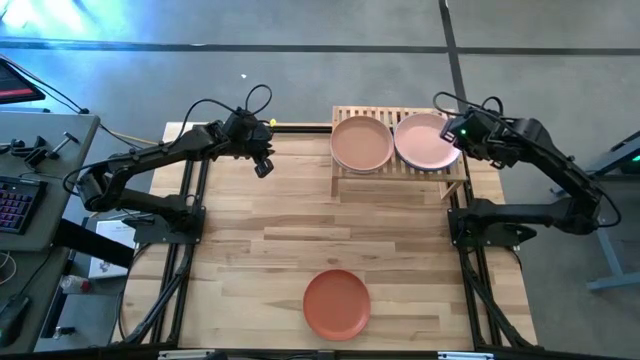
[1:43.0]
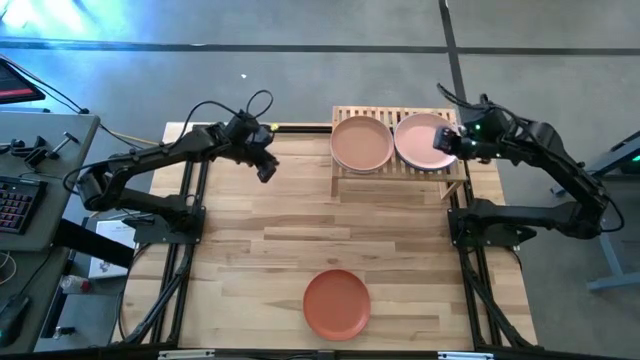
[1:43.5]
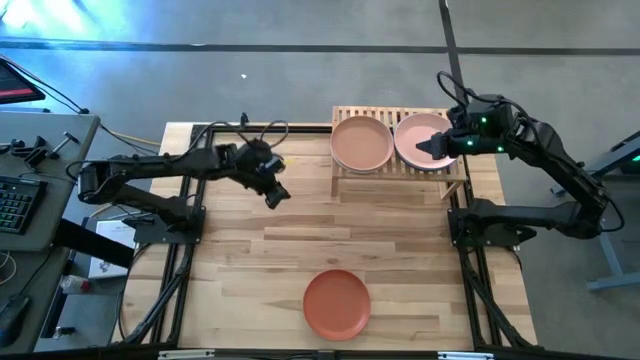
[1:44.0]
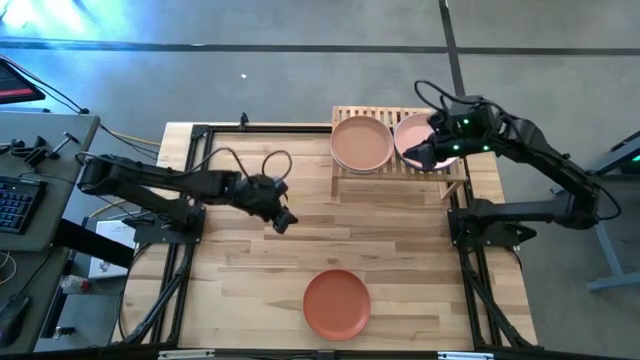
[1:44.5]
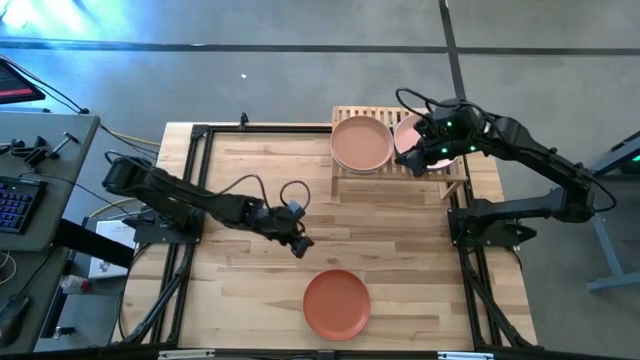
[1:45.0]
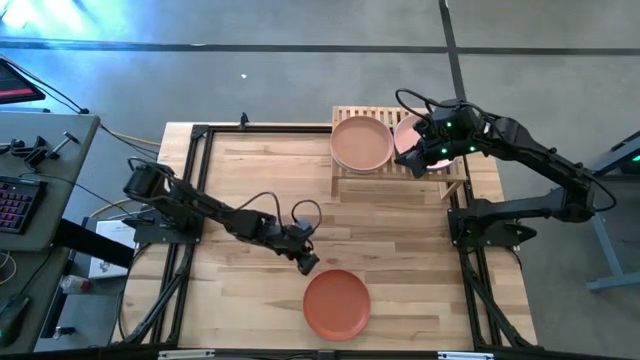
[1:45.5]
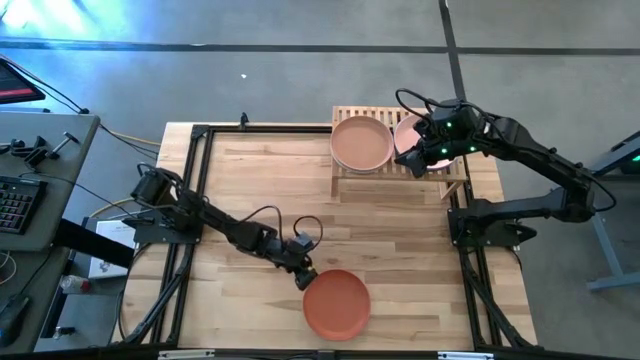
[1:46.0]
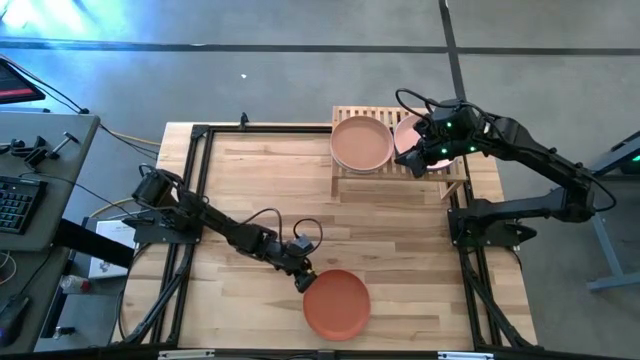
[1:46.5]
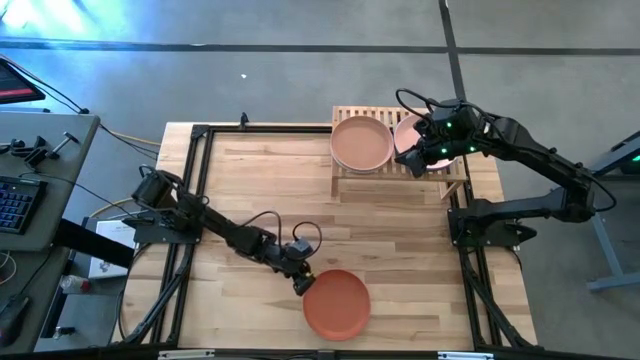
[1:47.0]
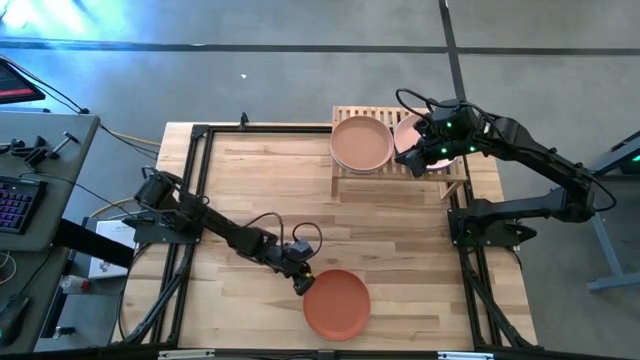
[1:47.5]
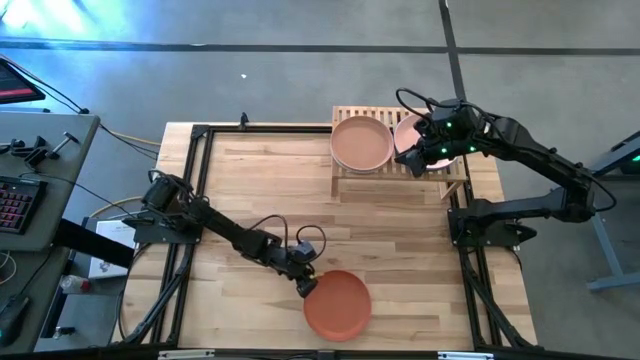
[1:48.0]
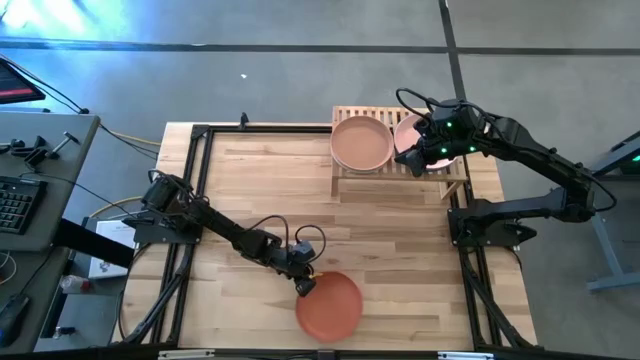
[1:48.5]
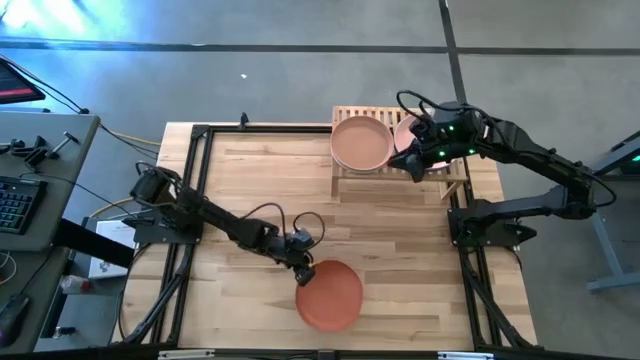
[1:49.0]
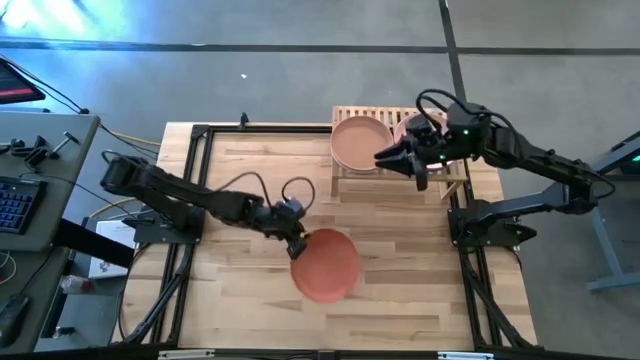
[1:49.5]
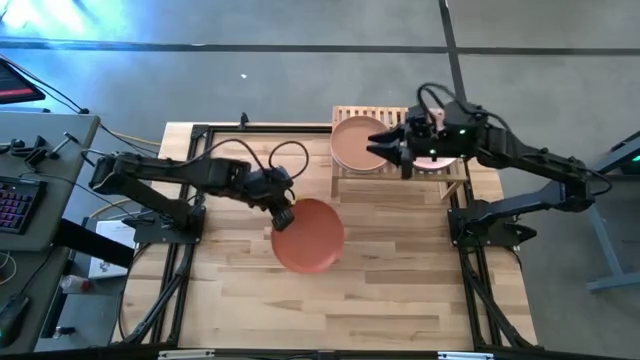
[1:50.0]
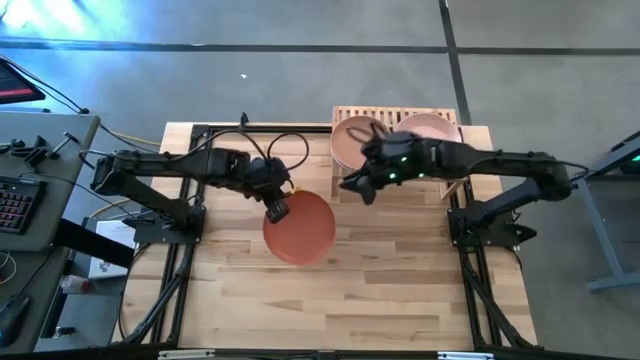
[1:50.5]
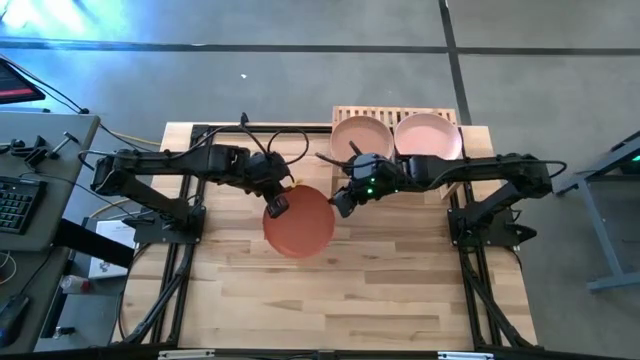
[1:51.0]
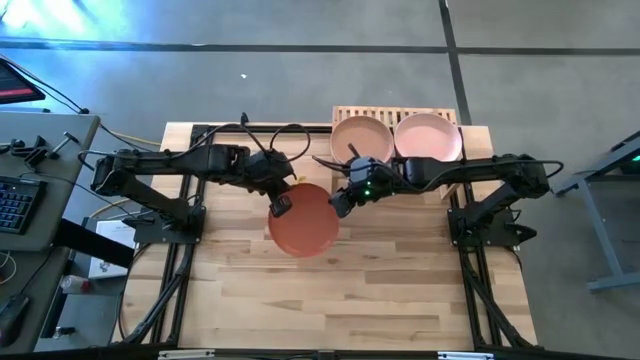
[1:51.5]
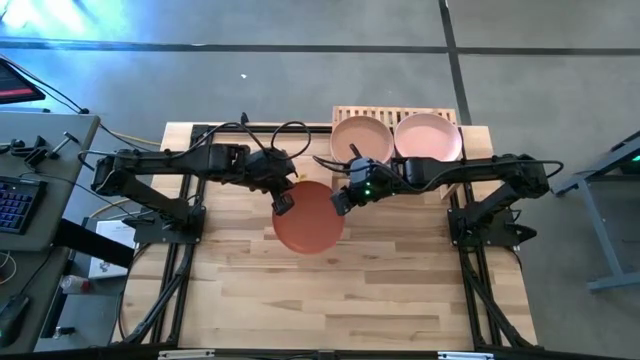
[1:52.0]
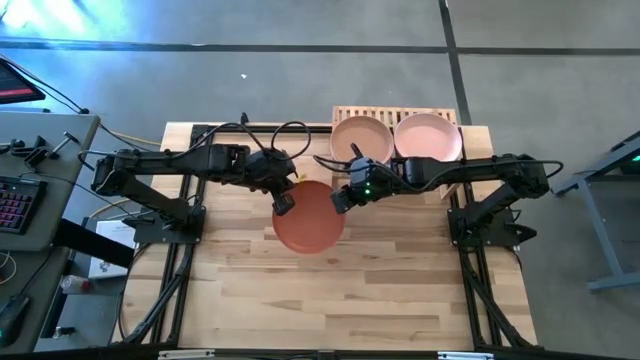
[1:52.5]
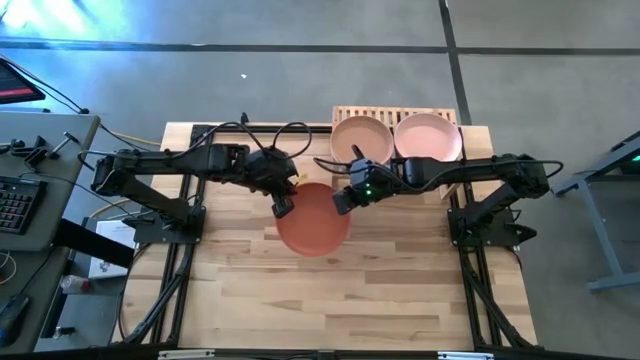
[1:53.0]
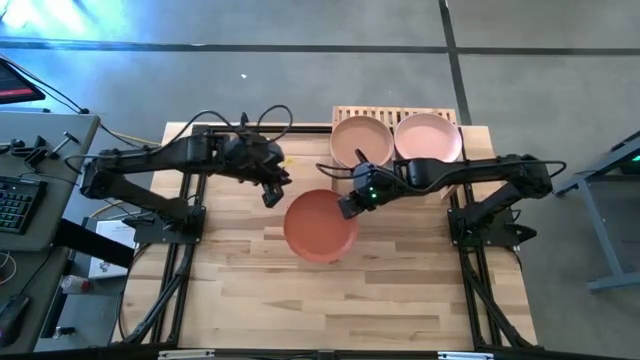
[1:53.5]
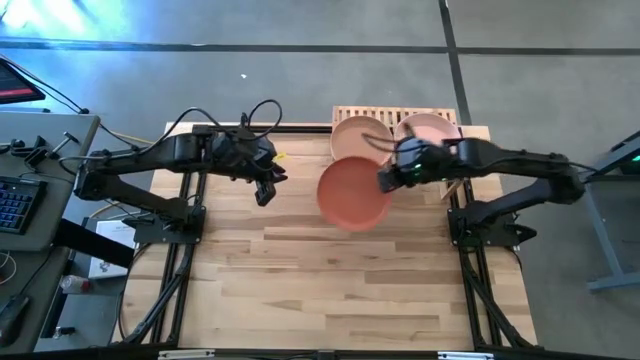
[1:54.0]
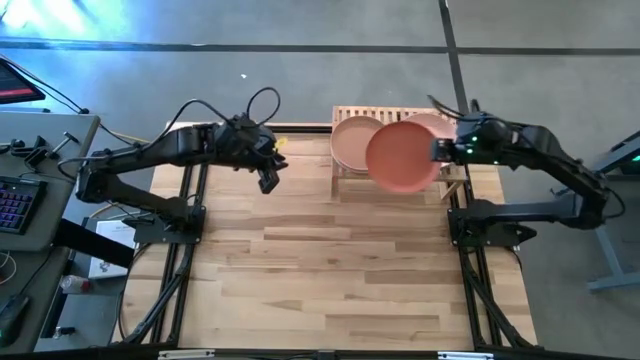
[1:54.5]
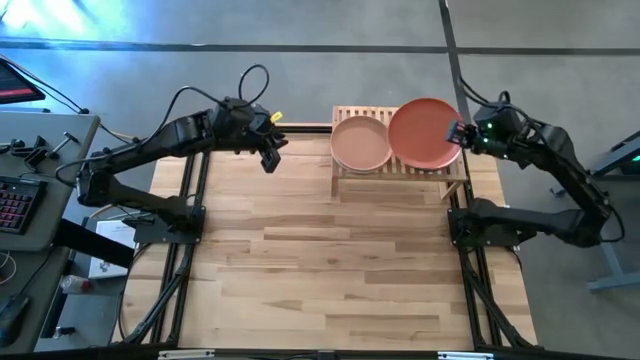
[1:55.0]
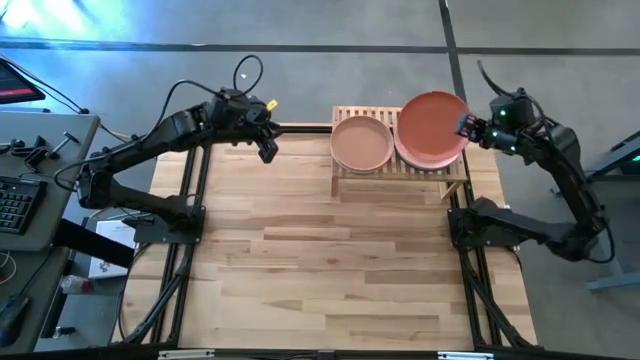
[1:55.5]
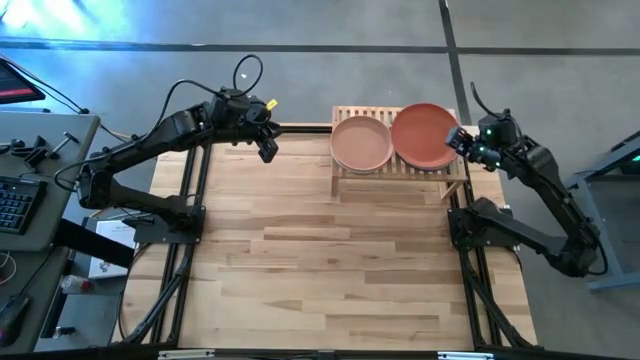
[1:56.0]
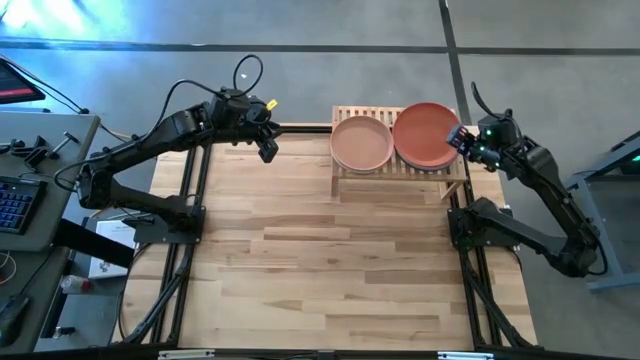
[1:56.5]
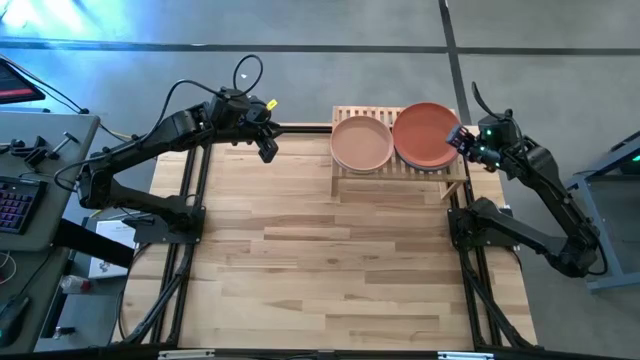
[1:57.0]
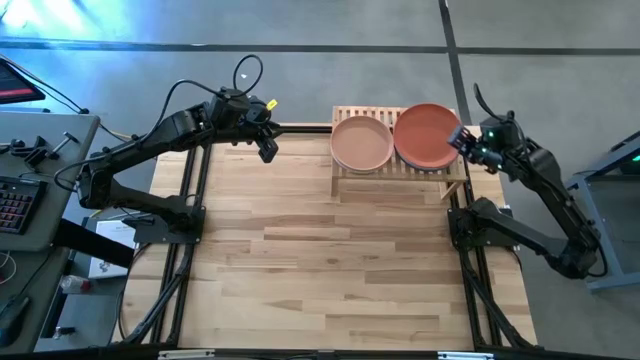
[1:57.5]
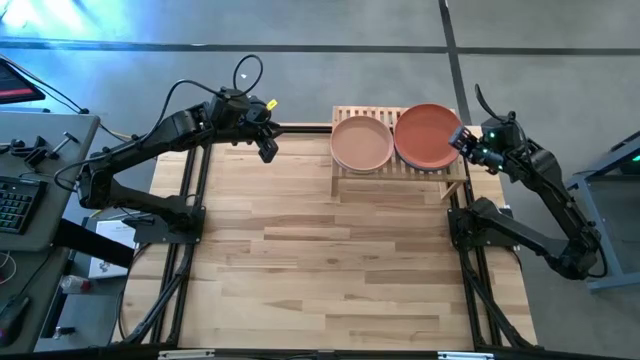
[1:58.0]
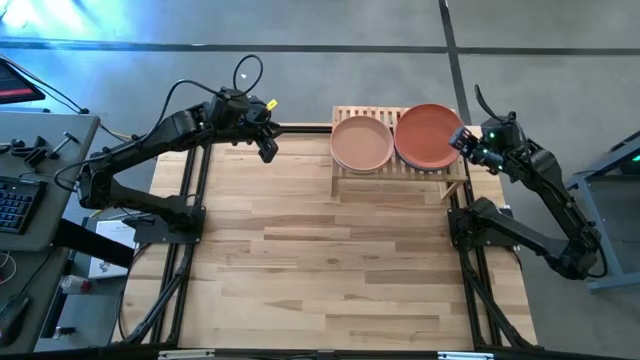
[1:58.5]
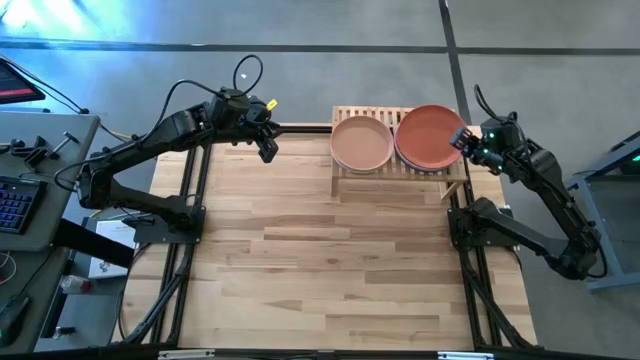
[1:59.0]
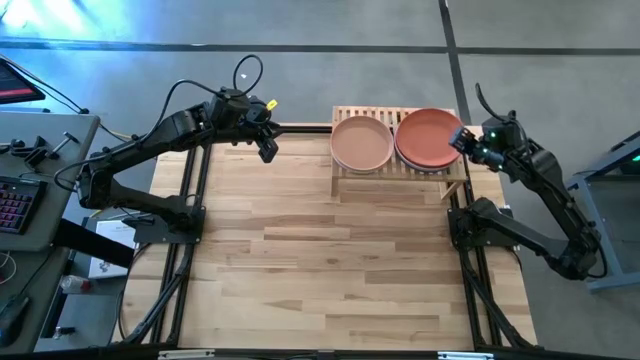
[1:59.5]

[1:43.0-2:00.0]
Task: Place and stack plates onto a shelf
Stack the orange plate on top of the apricot plate

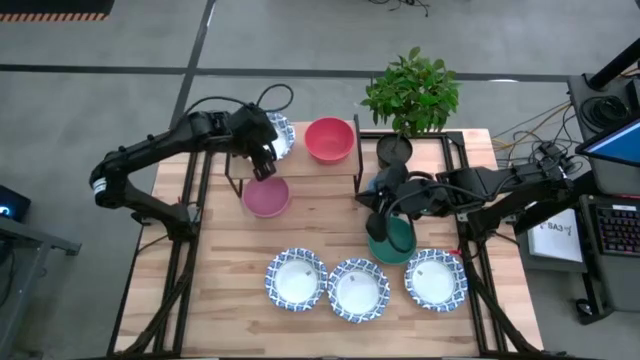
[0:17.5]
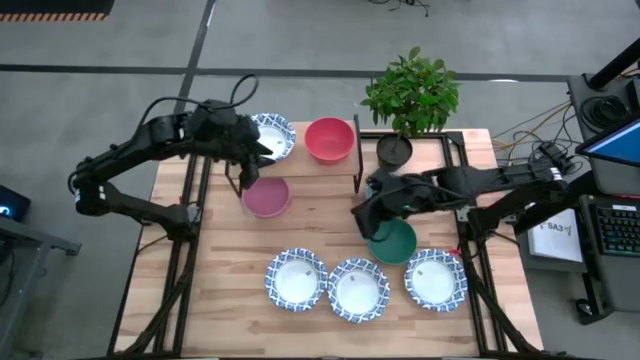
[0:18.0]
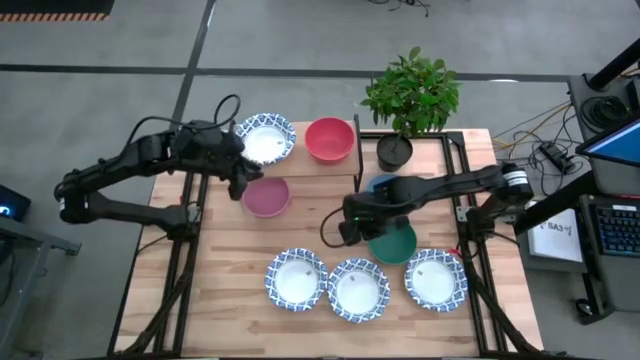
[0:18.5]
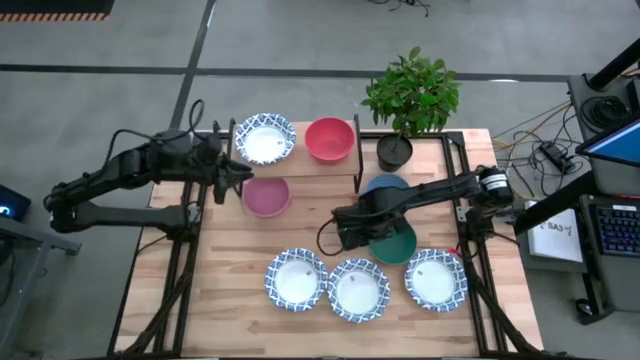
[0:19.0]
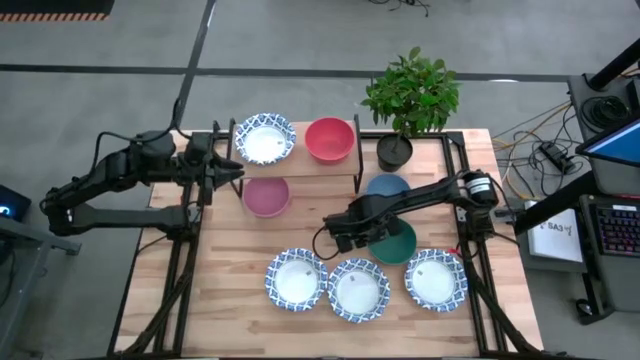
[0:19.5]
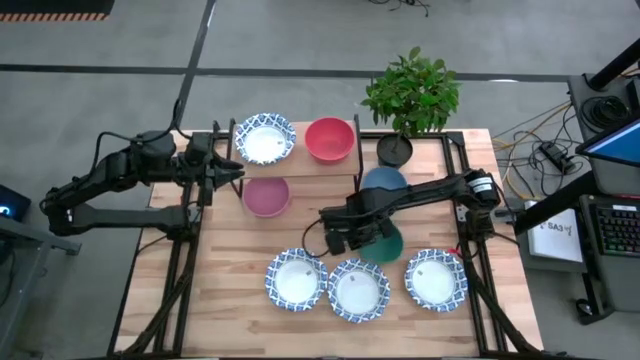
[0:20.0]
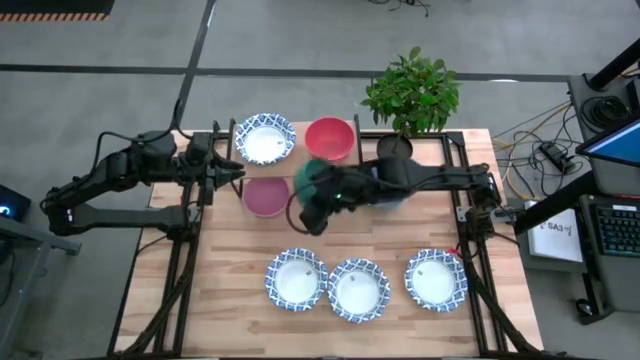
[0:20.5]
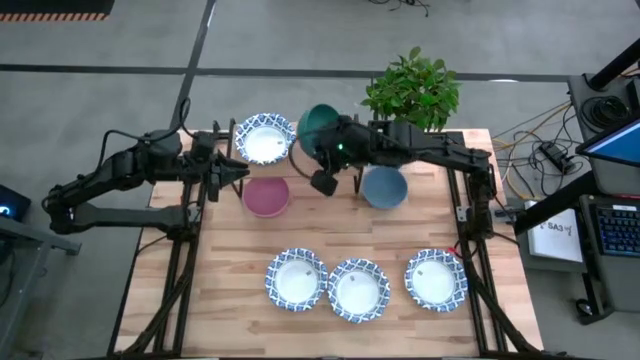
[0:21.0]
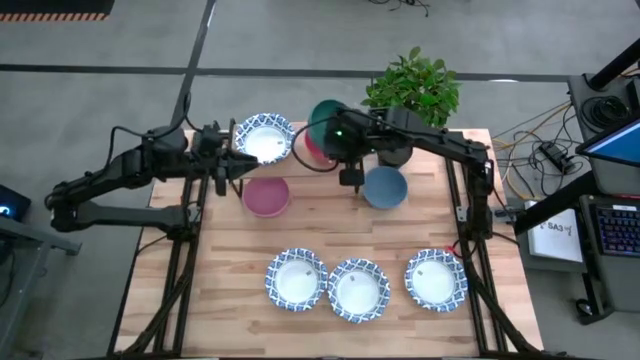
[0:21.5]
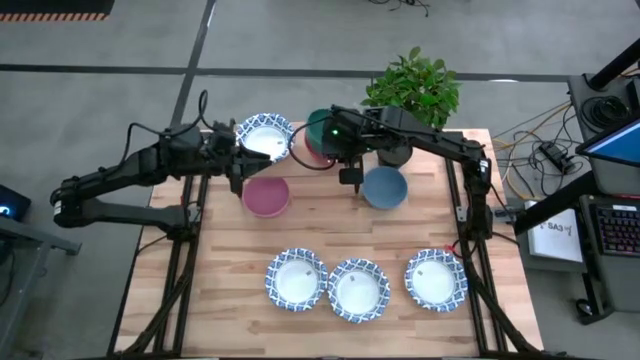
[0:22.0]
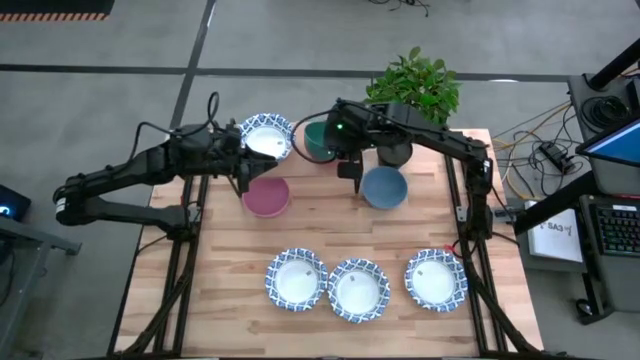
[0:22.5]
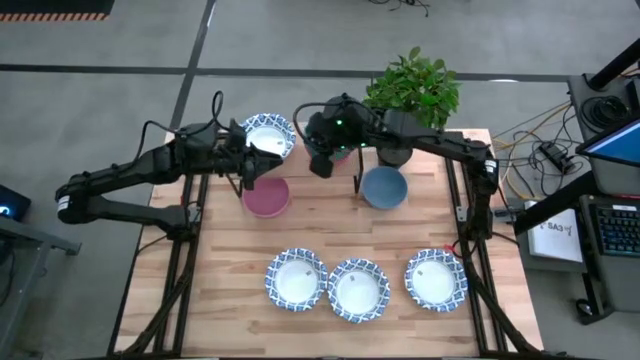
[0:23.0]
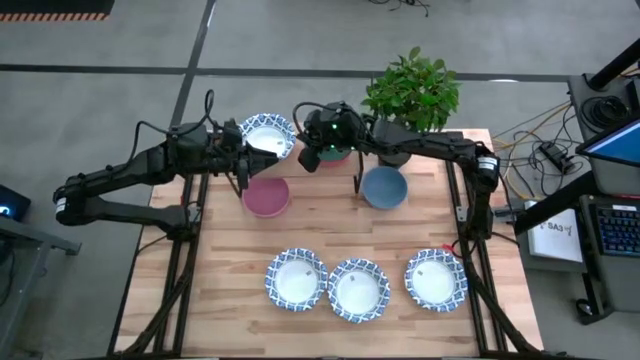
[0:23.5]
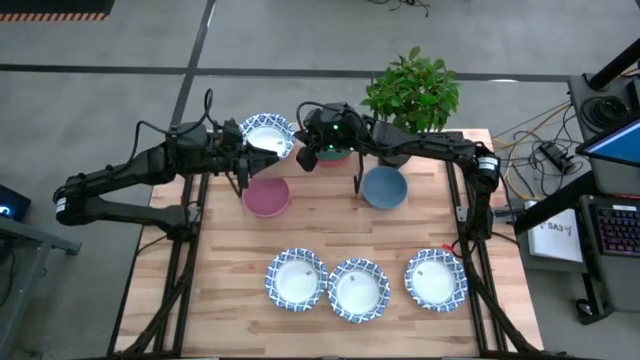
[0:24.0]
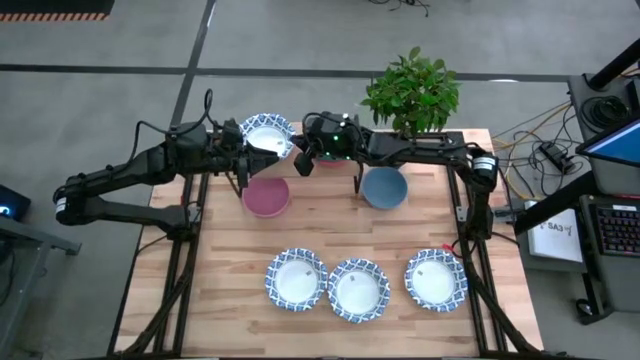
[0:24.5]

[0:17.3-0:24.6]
Task: Place and stack bowls onto a shelf
Stack the green plastic bowl on top of the red plastic bowl on the shelf
